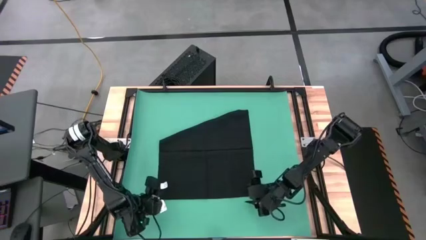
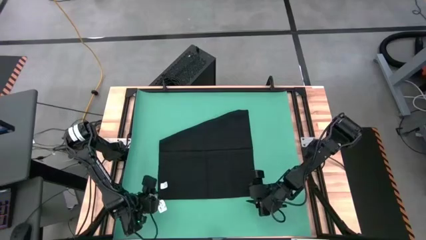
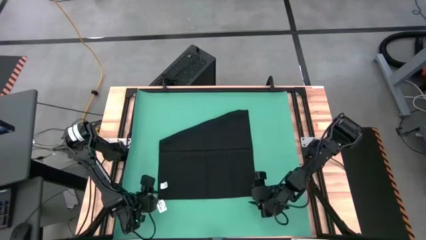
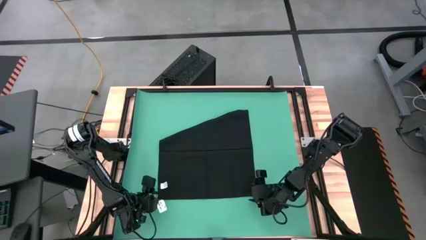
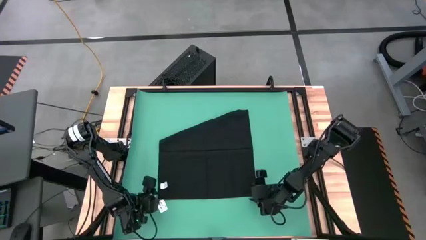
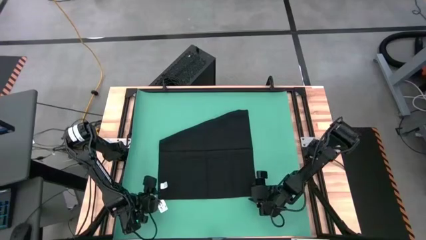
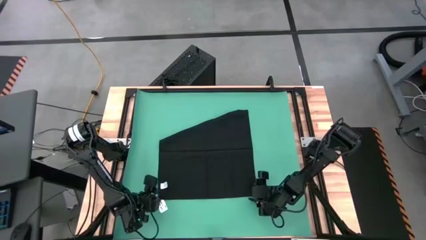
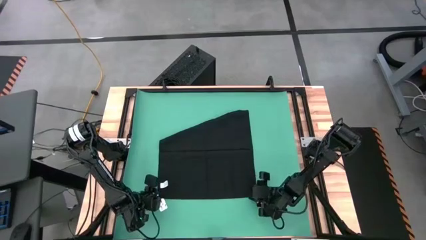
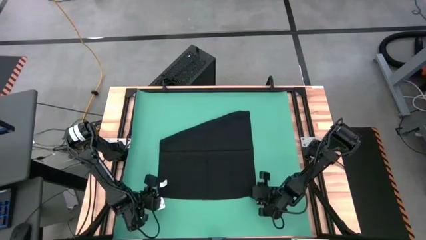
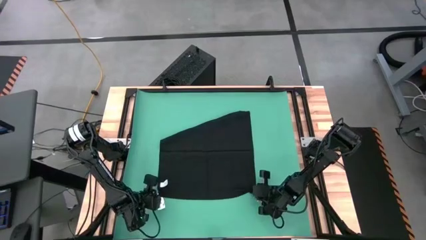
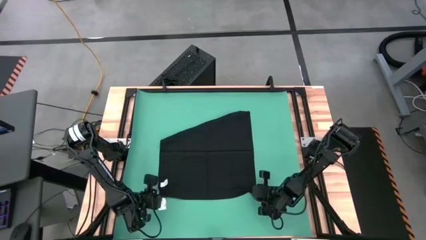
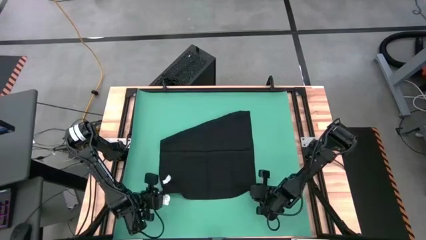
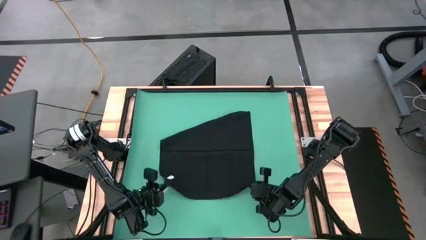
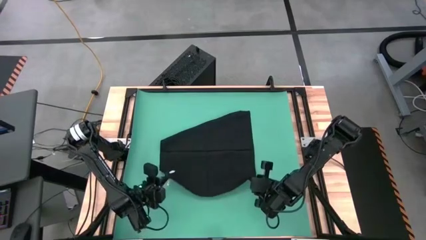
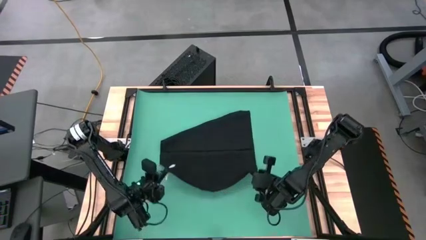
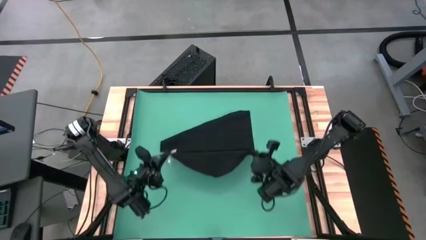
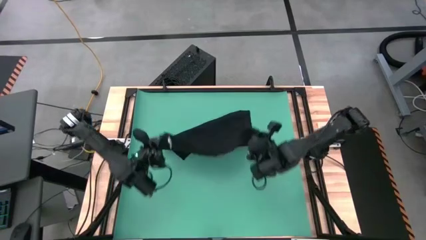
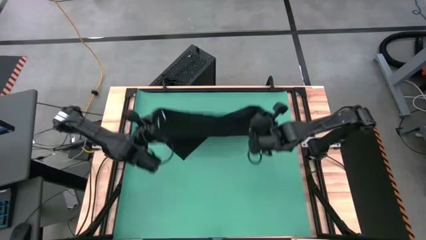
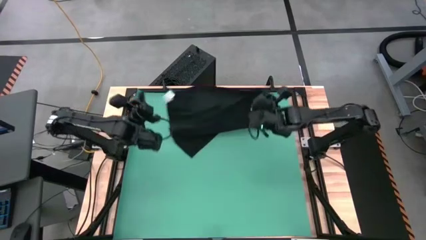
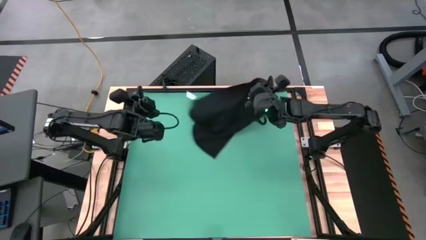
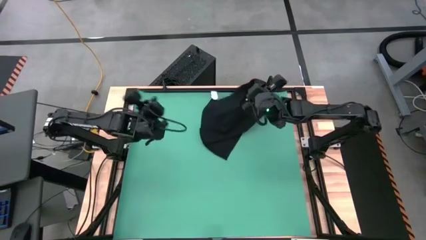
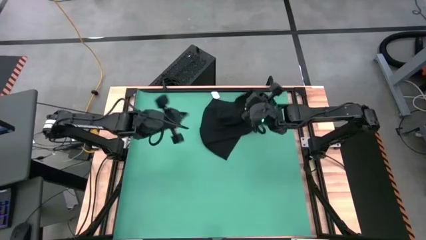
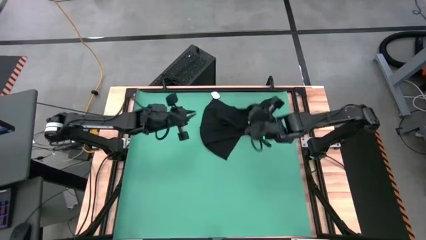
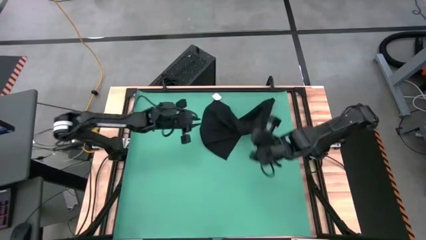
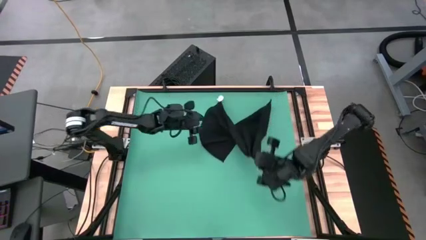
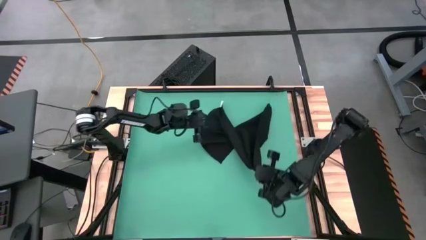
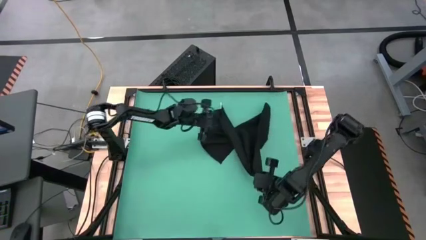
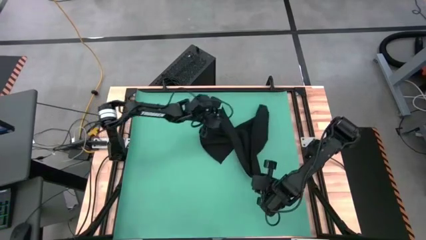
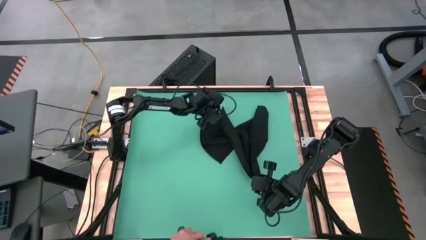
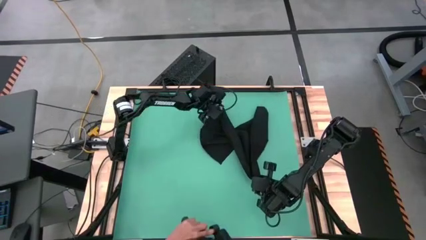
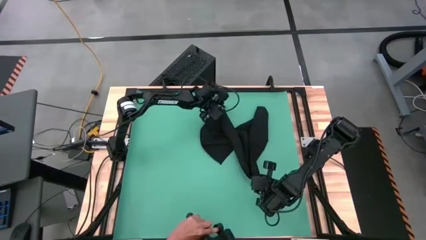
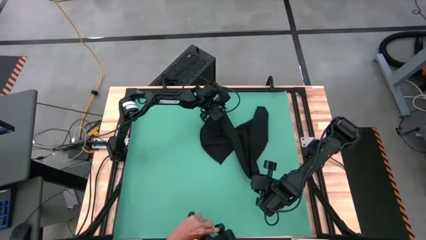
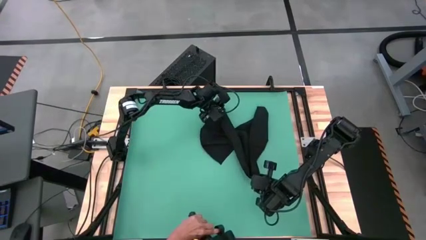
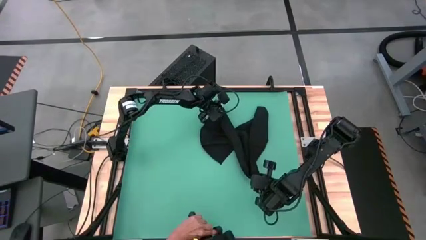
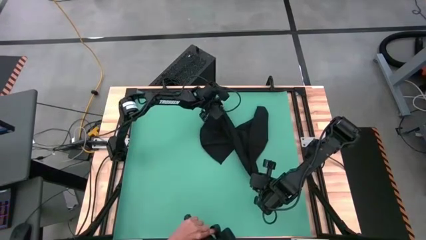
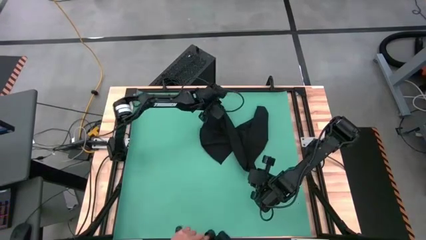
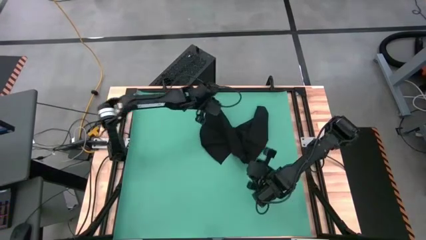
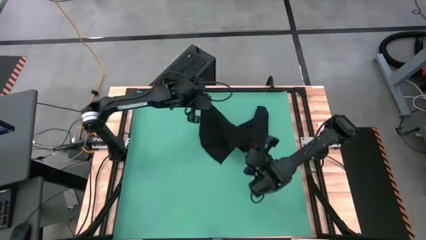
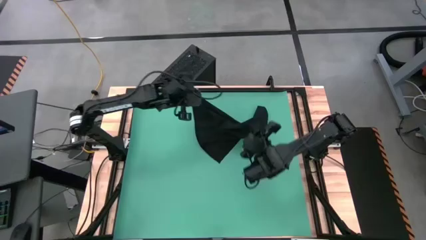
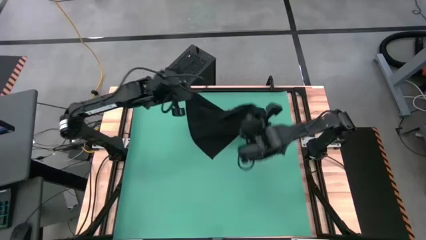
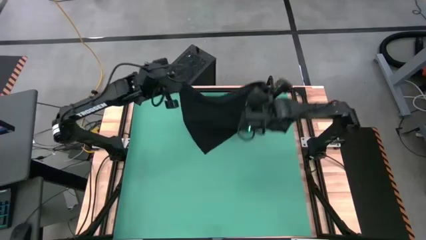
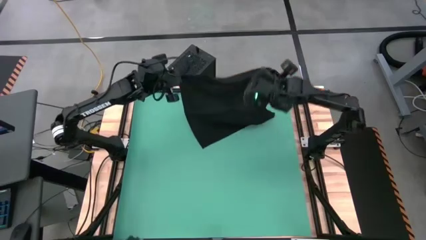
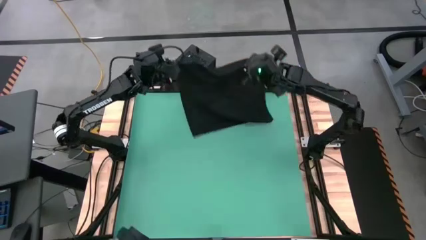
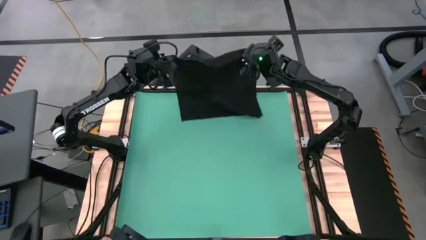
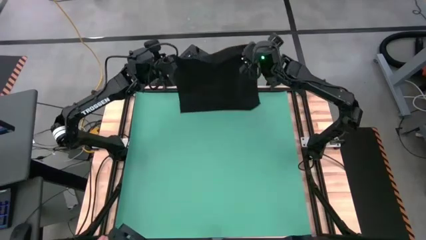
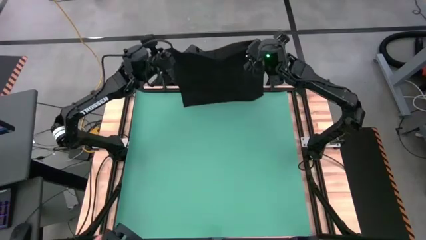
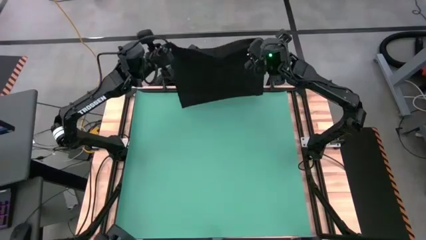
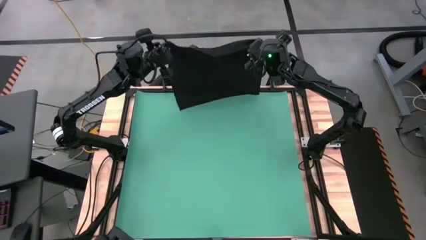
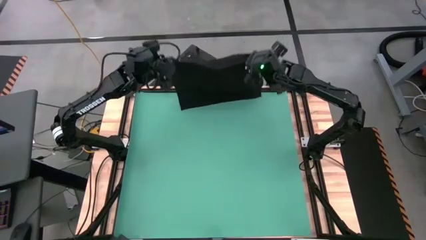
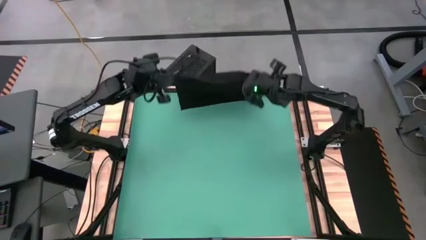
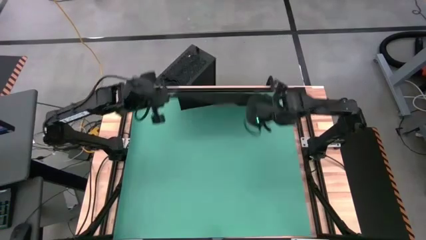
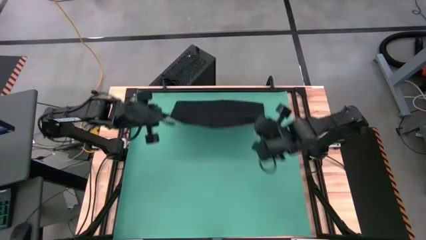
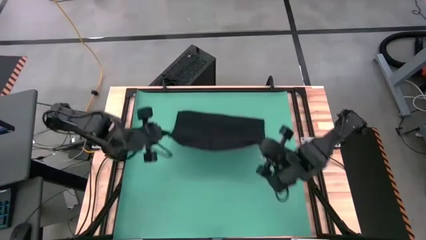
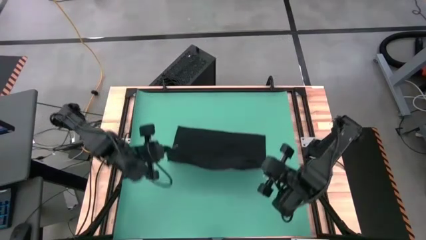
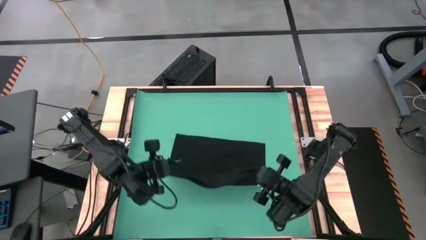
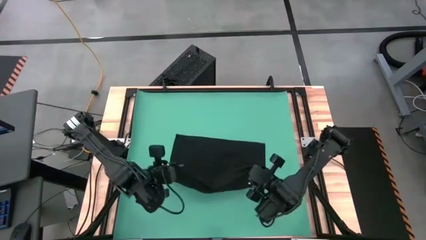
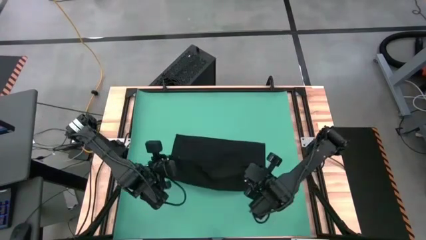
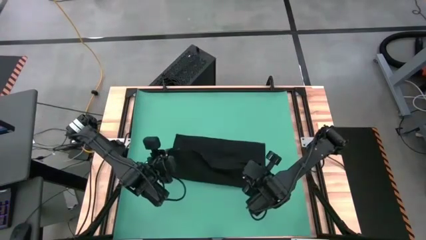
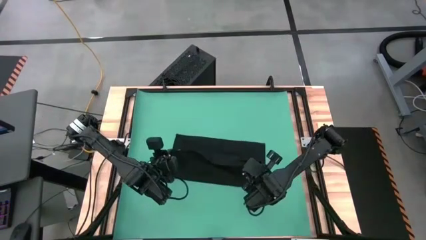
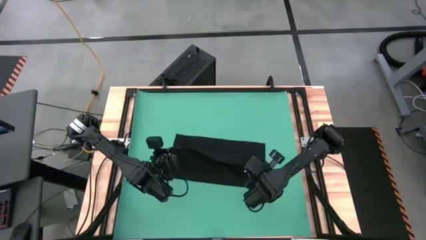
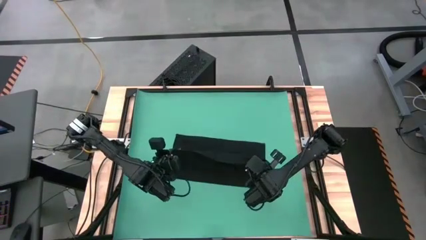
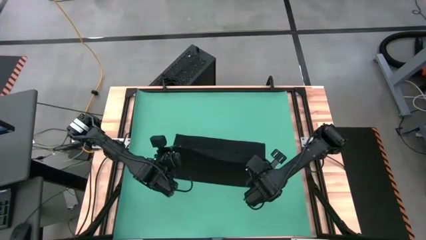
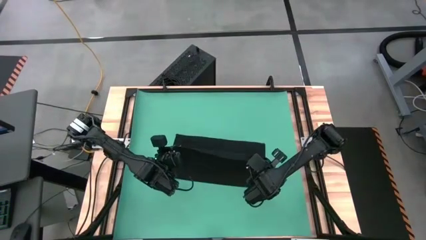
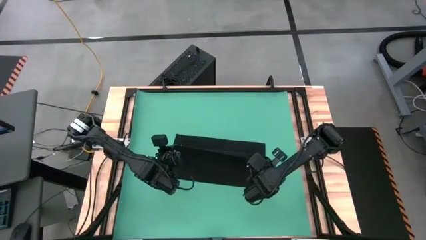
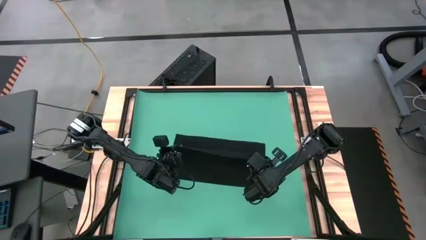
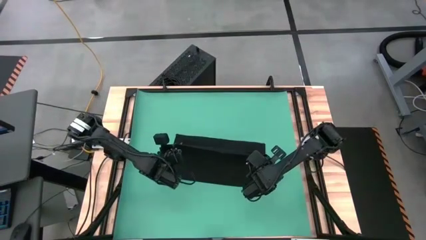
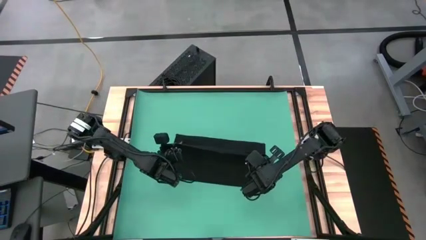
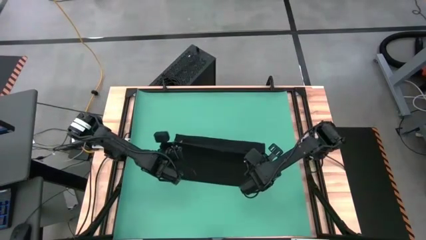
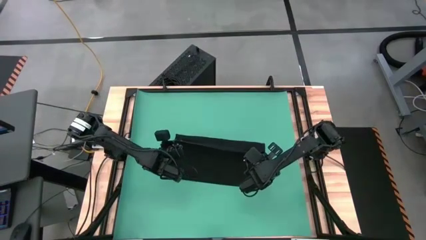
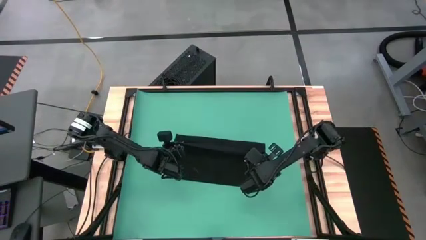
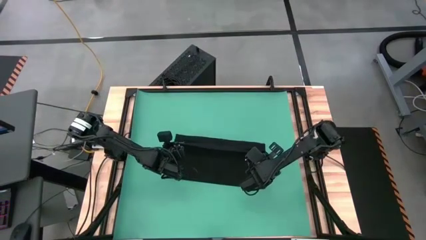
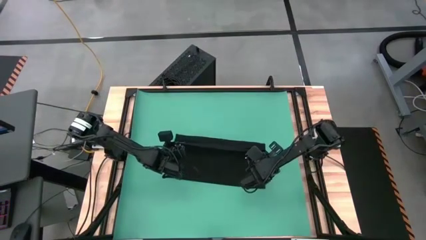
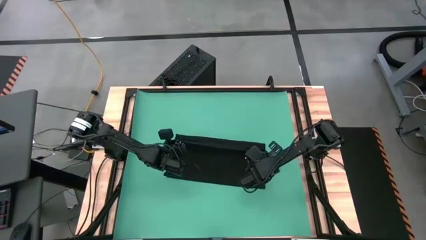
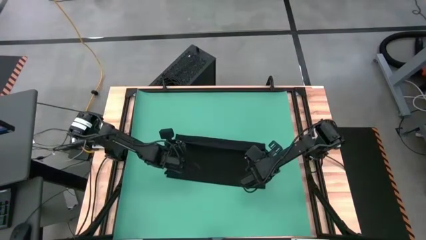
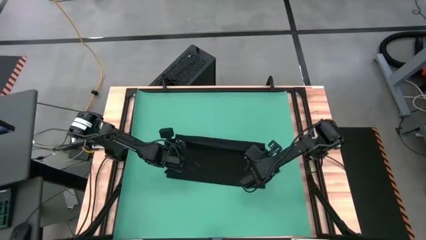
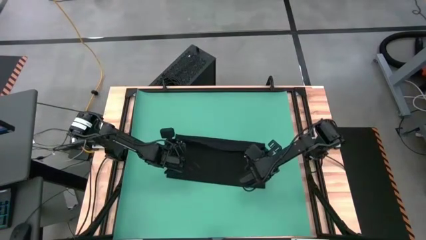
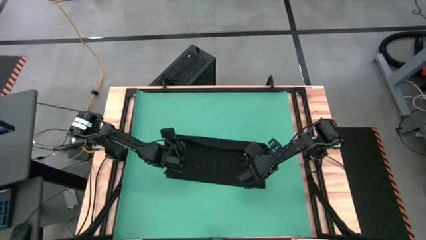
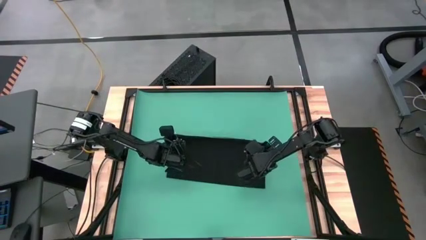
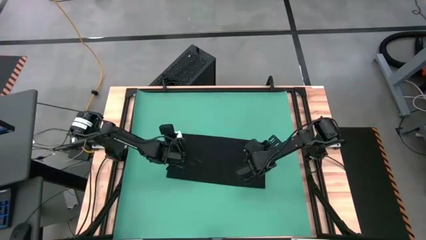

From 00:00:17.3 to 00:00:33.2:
Task: Roll towel
Fold the brown towel

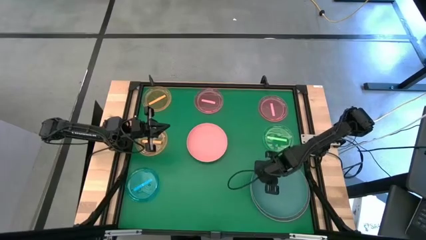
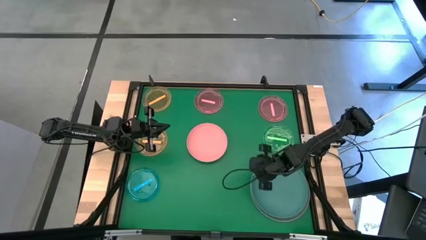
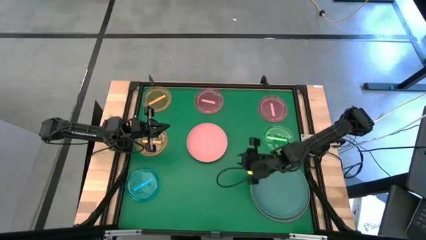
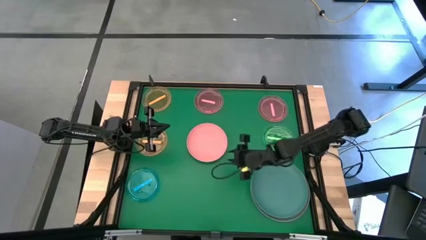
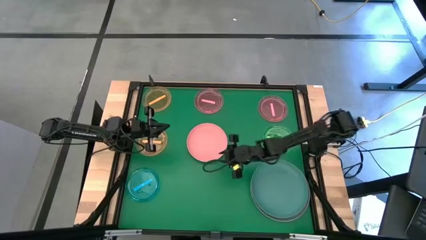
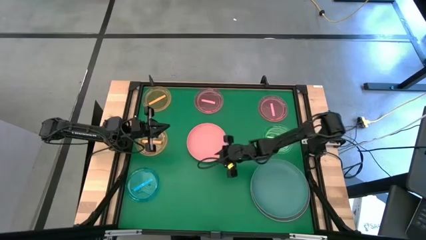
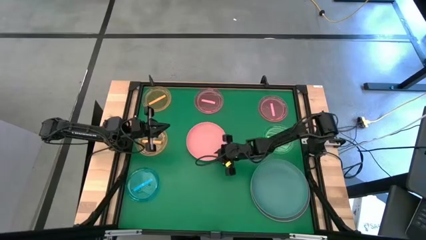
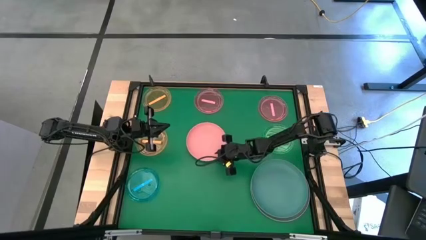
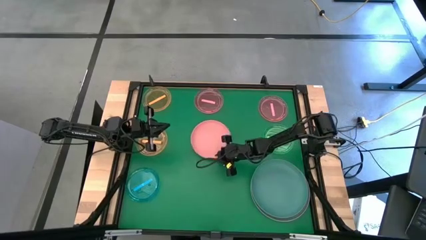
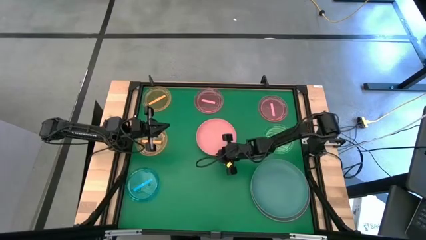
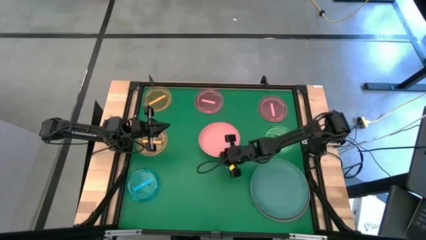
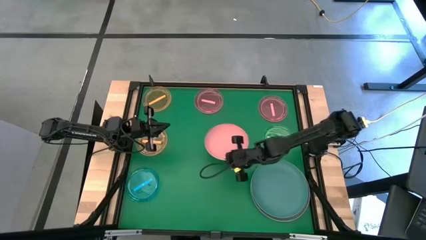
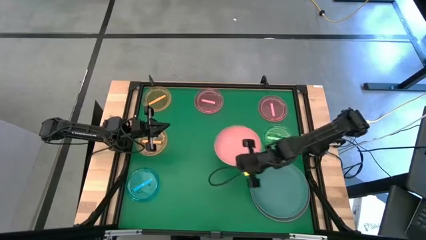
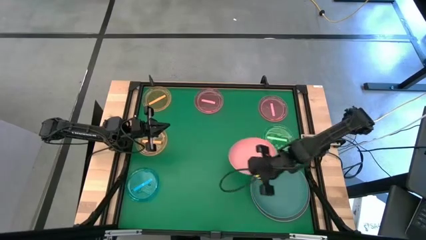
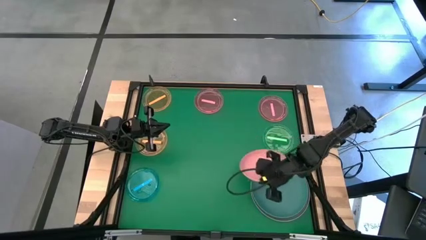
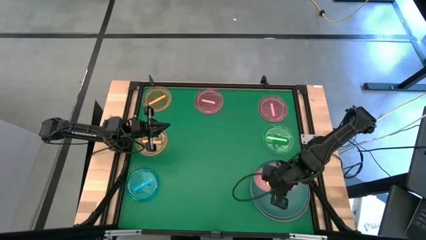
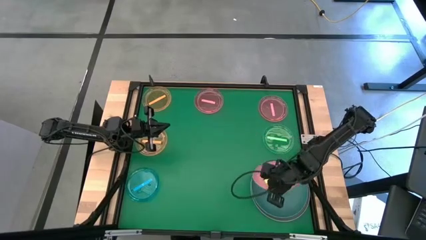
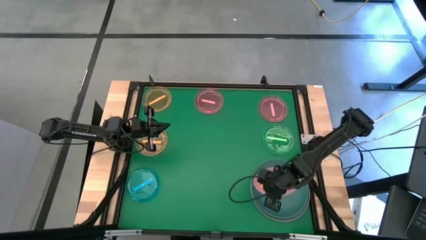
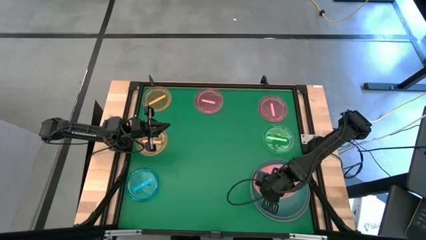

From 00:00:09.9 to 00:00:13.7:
Task: Stack plastic plates
Stack the pink plate on top of the green plate
